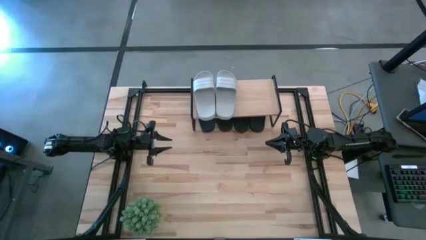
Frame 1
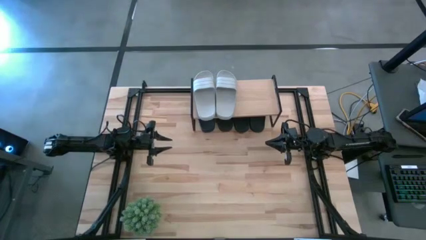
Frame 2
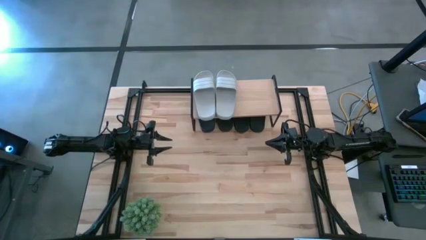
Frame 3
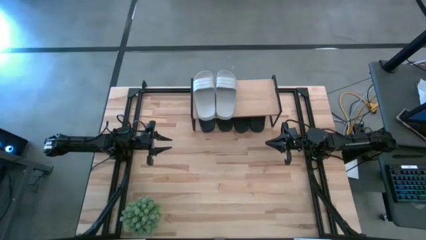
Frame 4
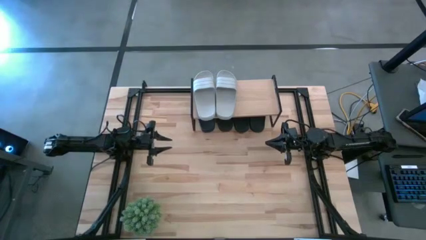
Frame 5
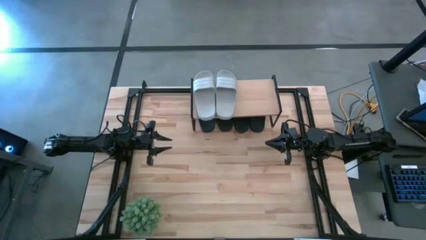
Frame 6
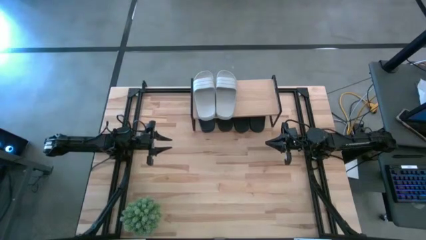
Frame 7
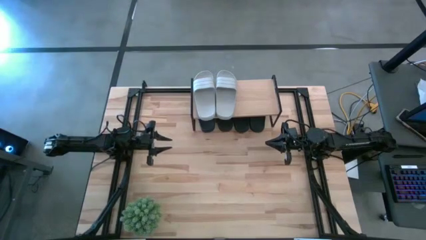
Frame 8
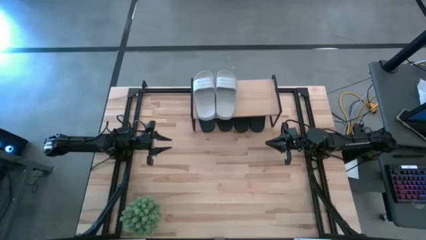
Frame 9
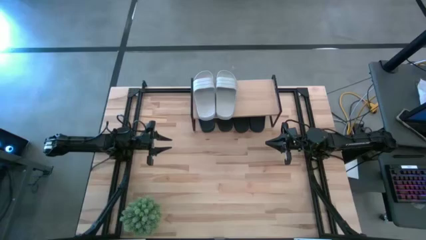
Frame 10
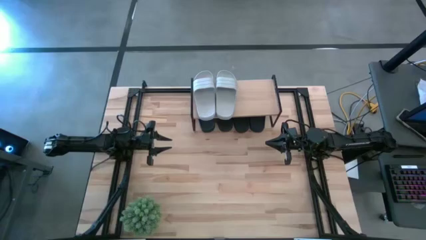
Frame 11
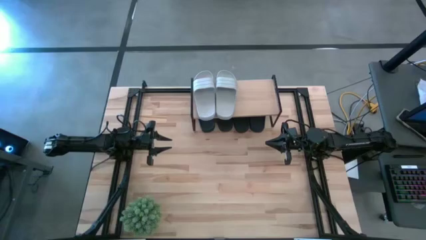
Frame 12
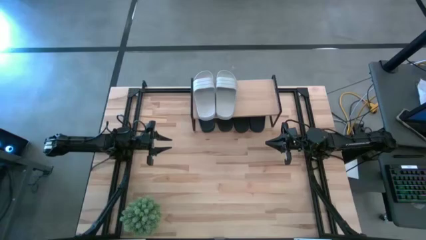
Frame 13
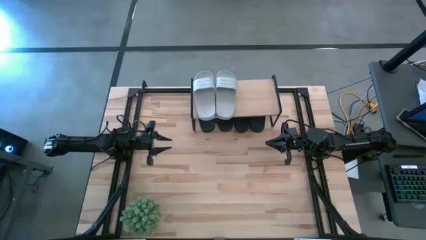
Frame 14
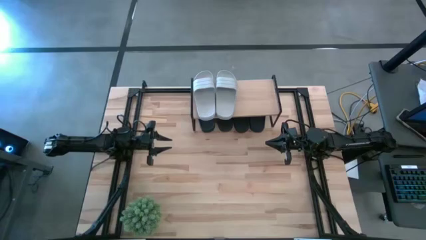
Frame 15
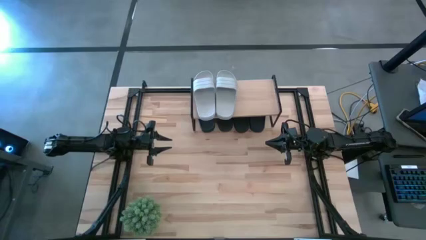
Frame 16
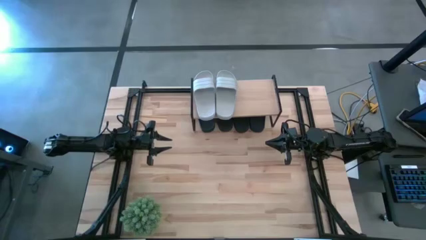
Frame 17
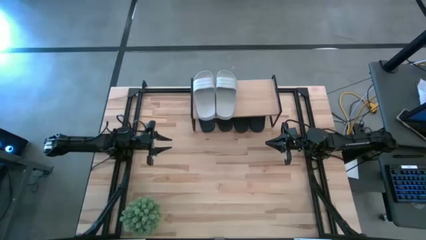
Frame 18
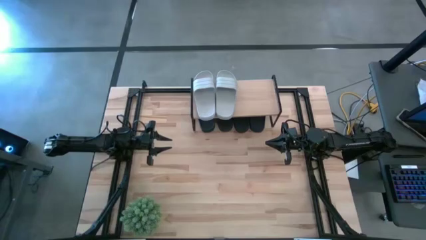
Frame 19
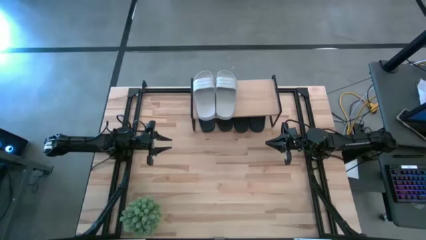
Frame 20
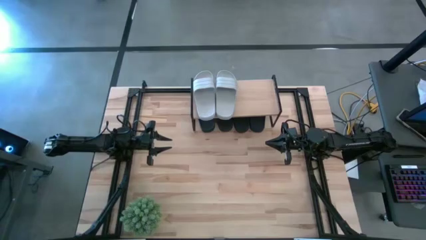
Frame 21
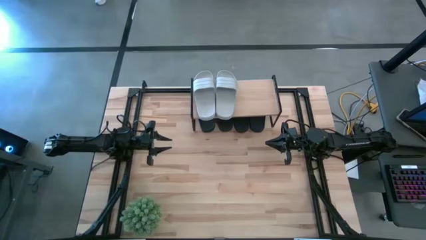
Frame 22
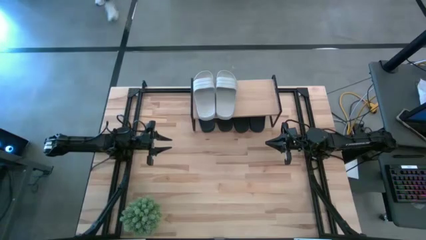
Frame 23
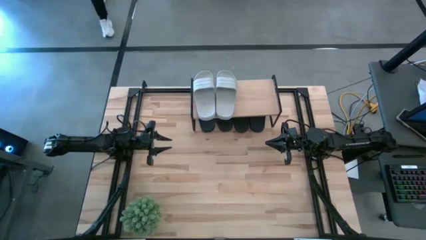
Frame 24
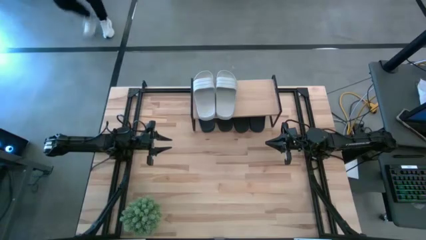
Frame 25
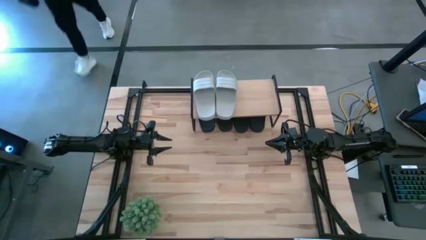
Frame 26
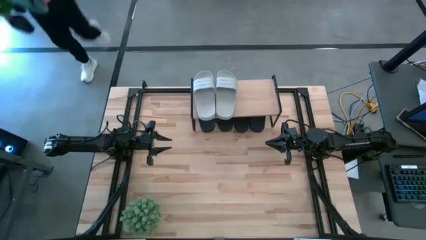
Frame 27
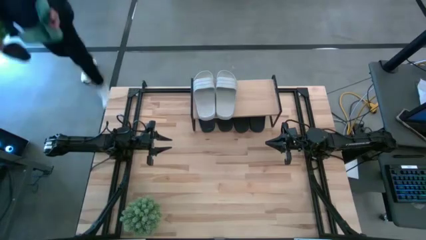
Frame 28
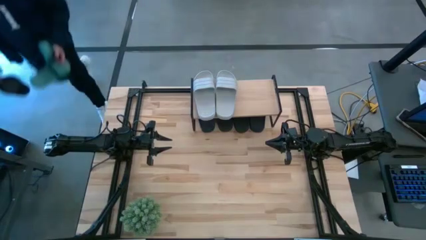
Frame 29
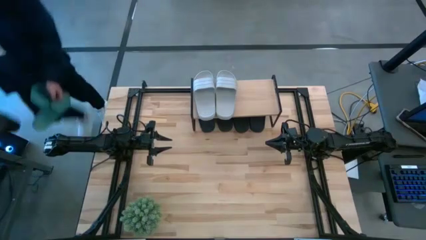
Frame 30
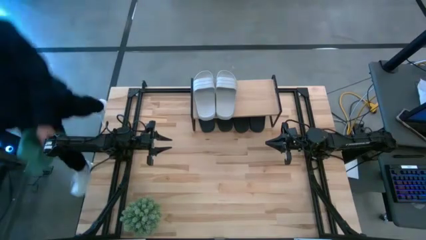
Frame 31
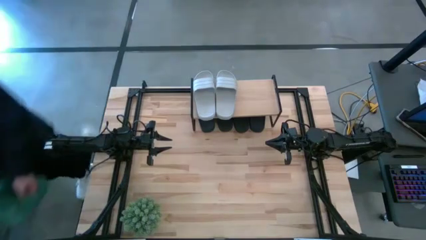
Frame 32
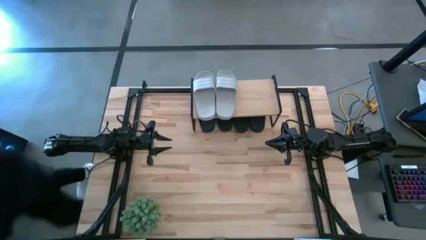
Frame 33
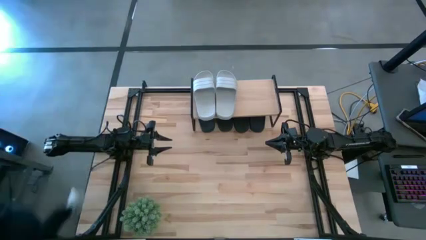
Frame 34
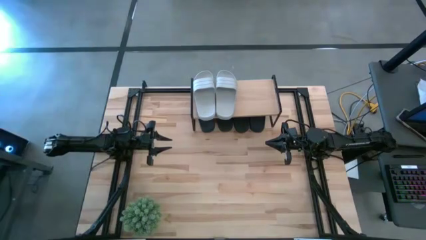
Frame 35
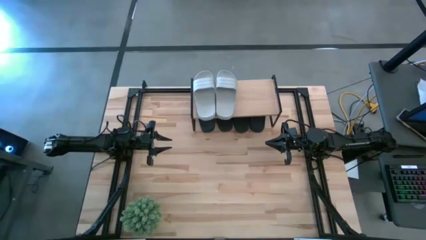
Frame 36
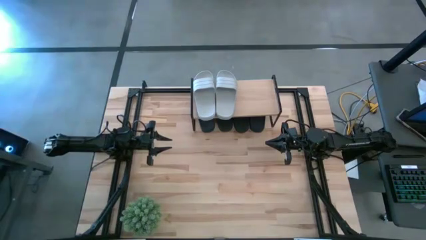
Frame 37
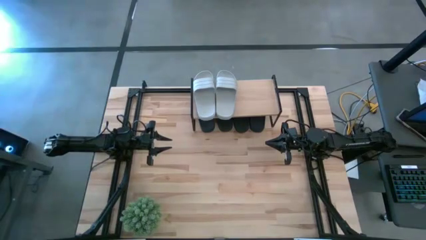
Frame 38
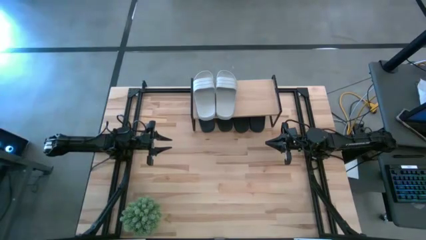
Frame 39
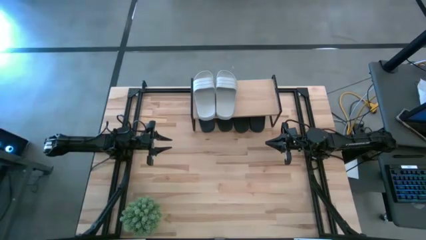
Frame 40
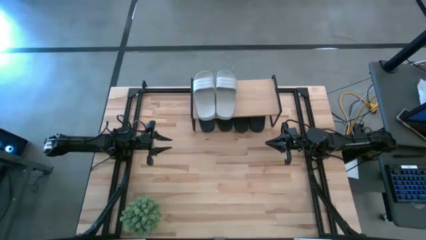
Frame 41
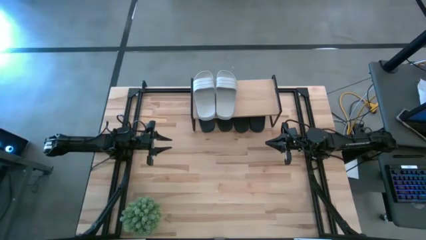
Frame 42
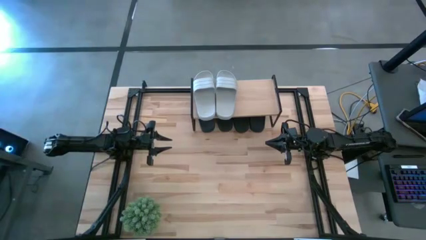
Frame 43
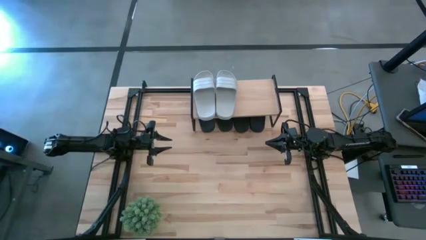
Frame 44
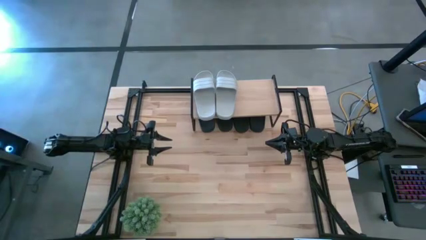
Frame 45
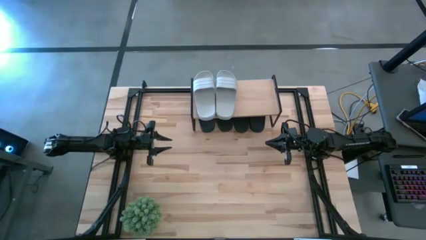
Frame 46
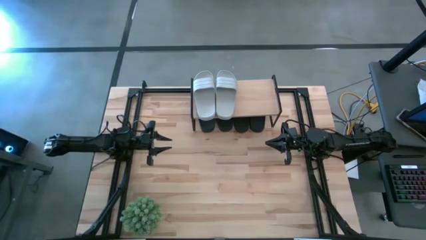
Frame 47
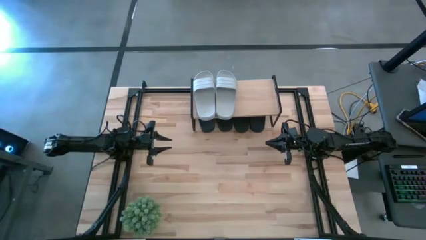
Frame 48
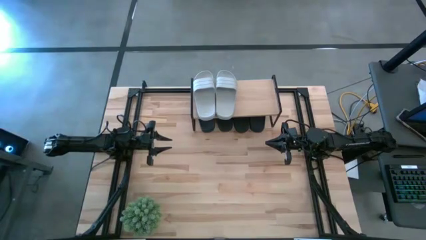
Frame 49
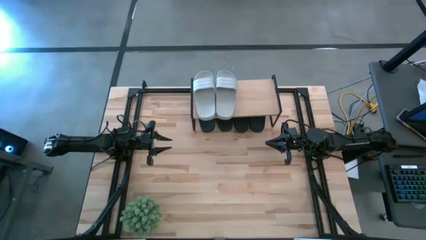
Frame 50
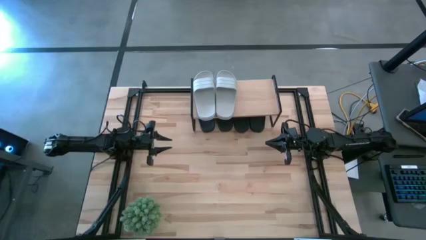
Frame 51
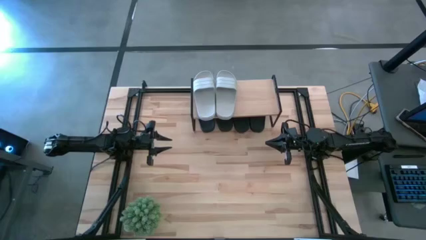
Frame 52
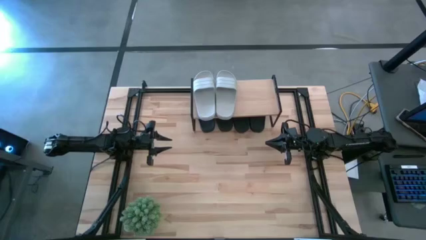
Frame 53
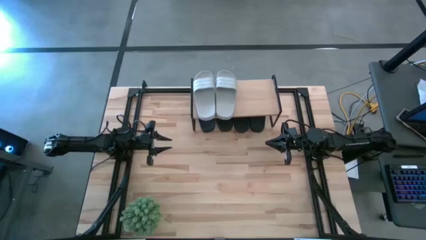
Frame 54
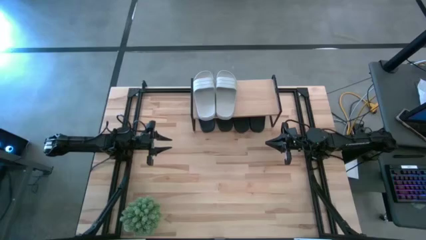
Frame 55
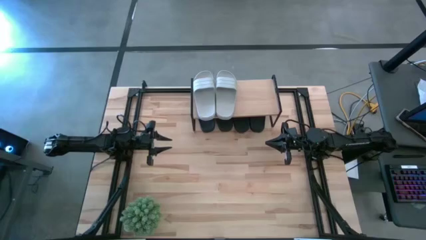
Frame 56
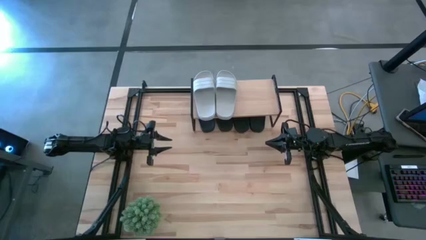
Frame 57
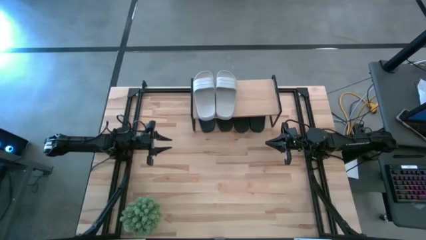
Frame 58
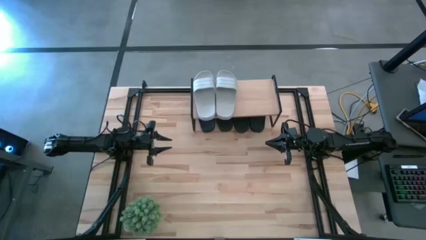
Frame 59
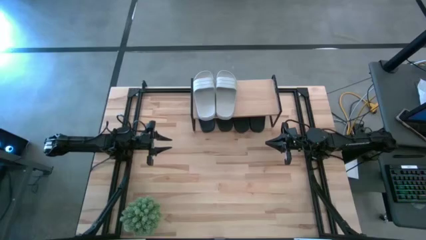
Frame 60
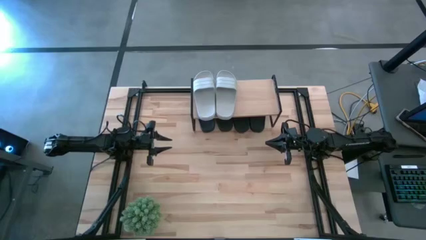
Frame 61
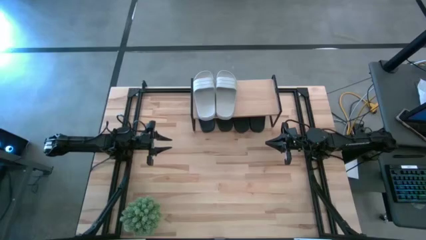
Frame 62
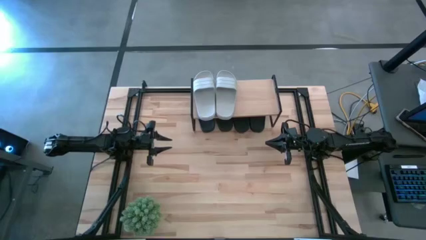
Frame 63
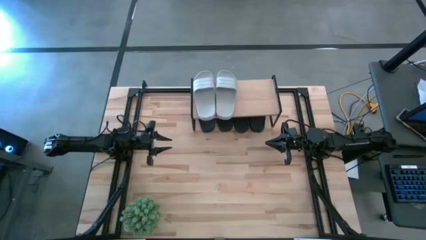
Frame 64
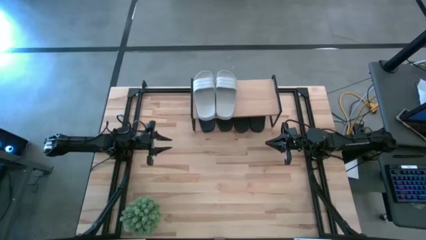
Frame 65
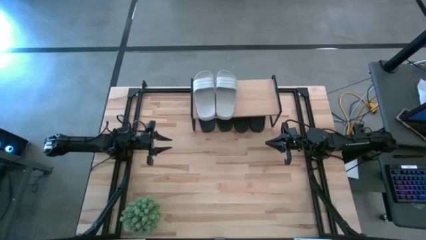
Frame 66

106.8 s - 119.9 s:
Task: Pick and place slides into the shelf
Return to Home Position
